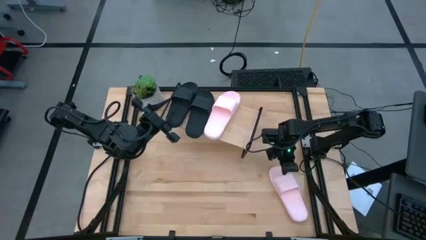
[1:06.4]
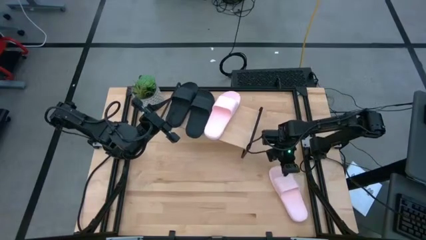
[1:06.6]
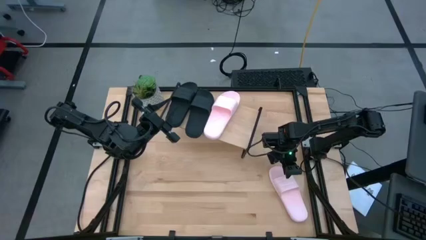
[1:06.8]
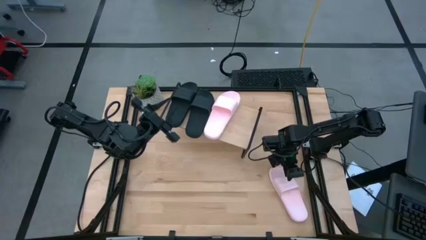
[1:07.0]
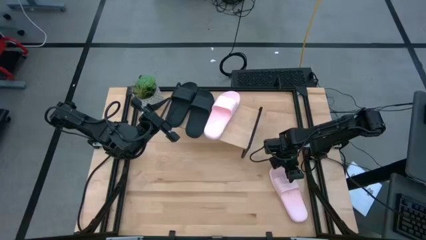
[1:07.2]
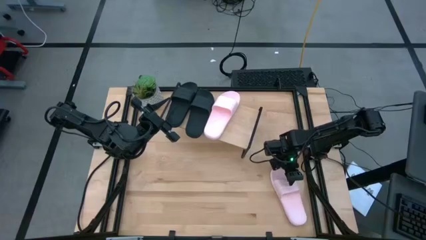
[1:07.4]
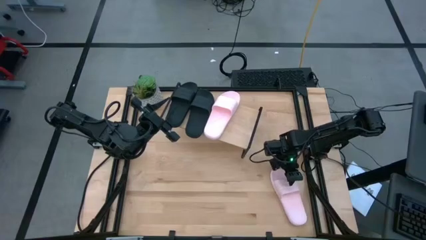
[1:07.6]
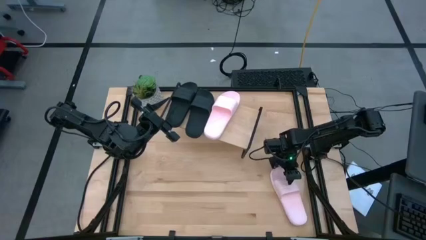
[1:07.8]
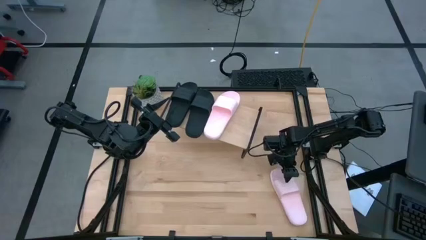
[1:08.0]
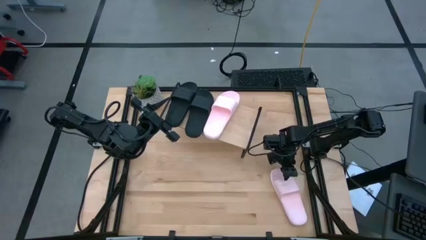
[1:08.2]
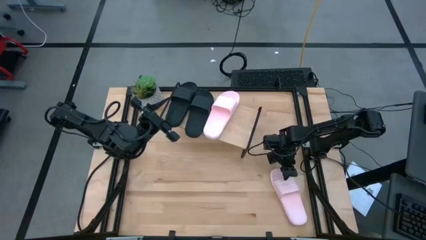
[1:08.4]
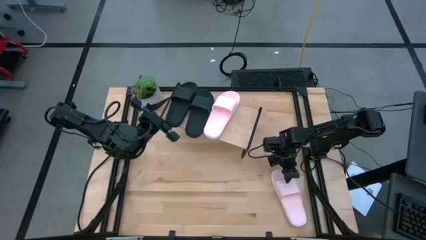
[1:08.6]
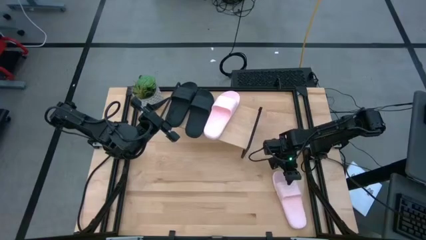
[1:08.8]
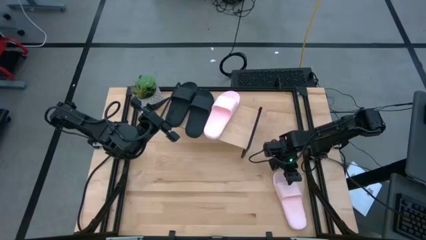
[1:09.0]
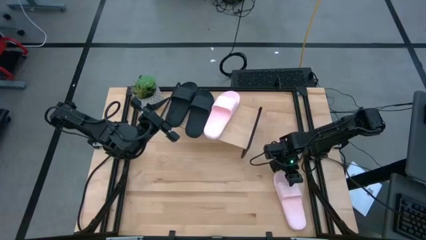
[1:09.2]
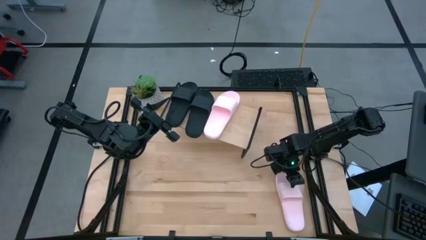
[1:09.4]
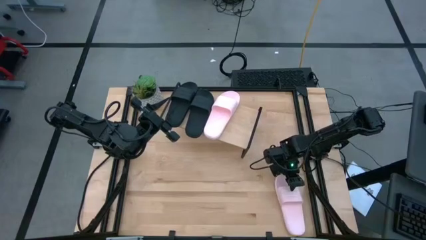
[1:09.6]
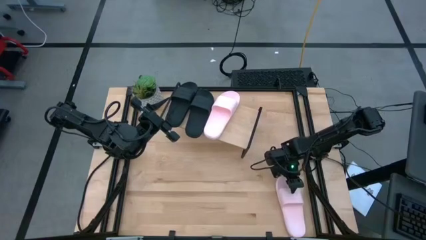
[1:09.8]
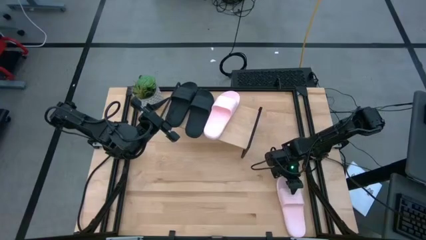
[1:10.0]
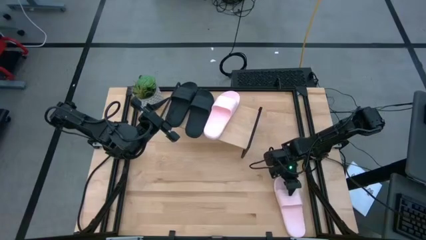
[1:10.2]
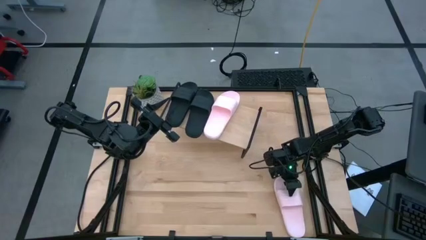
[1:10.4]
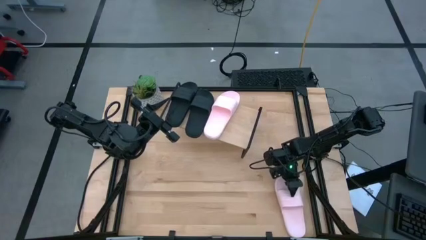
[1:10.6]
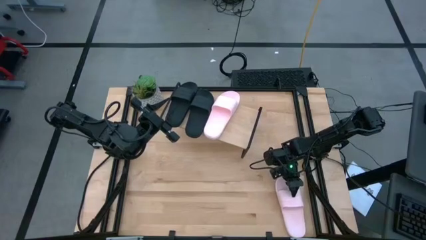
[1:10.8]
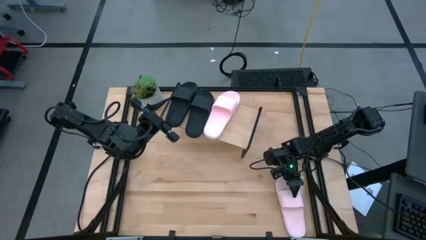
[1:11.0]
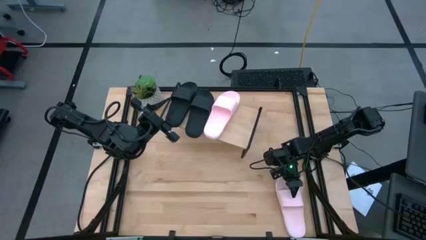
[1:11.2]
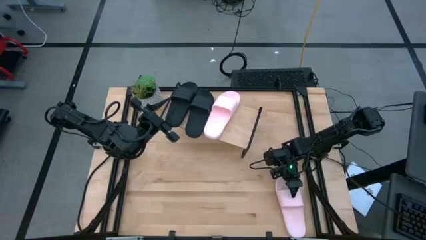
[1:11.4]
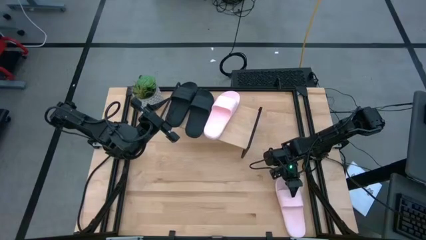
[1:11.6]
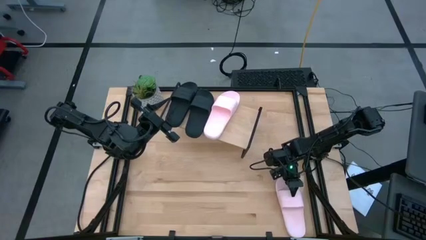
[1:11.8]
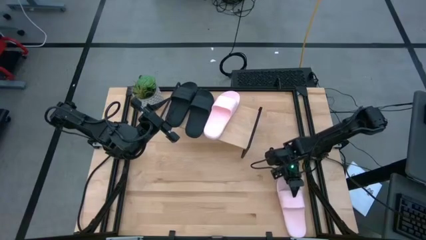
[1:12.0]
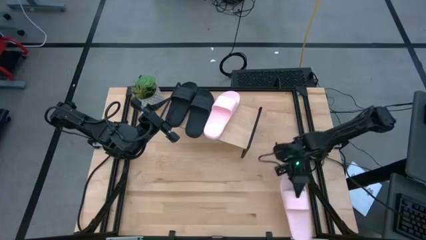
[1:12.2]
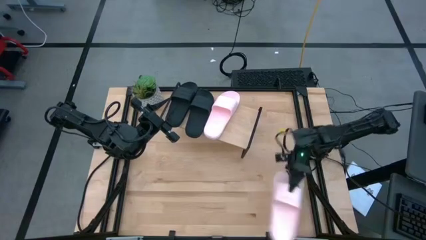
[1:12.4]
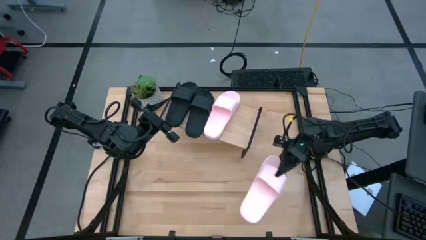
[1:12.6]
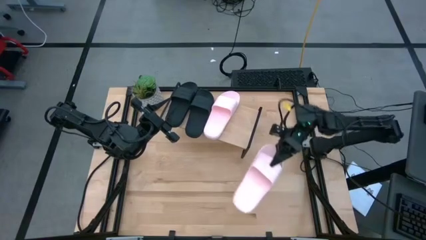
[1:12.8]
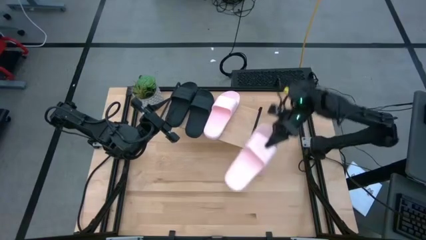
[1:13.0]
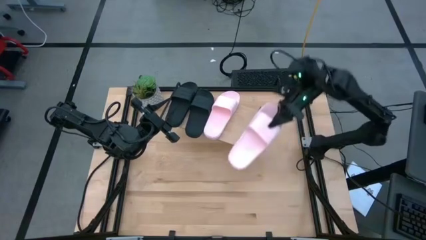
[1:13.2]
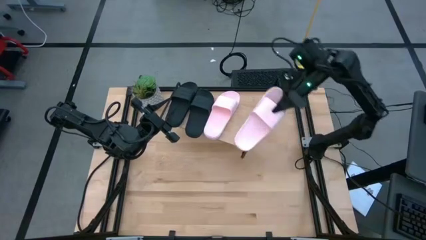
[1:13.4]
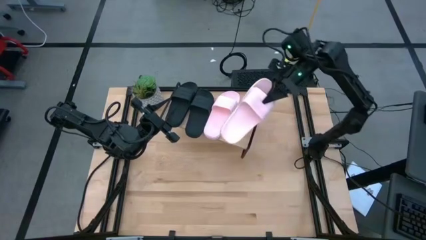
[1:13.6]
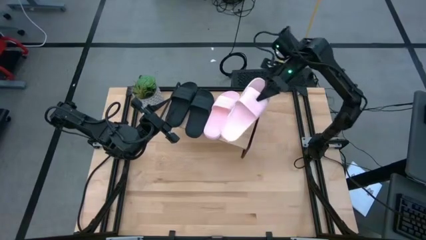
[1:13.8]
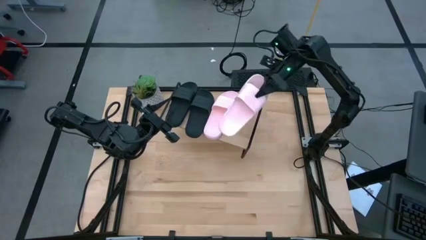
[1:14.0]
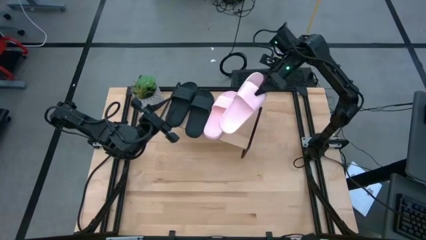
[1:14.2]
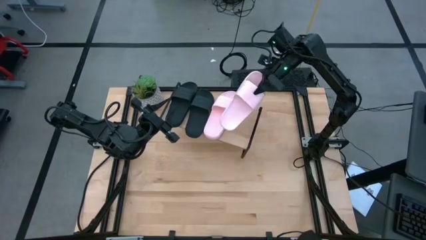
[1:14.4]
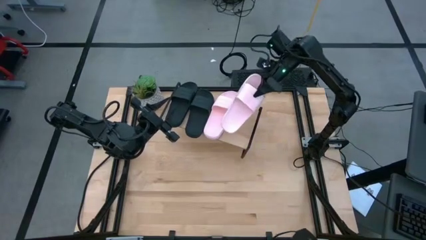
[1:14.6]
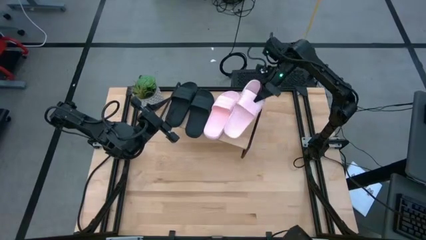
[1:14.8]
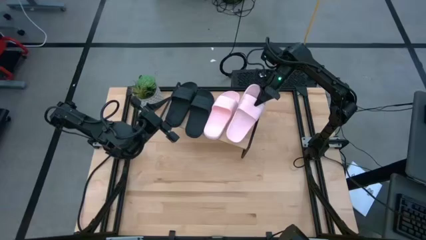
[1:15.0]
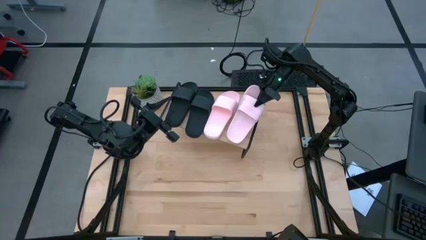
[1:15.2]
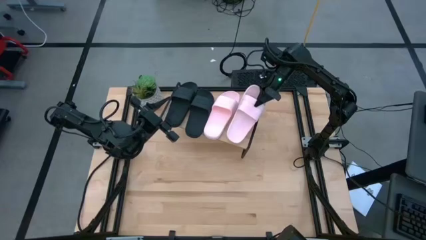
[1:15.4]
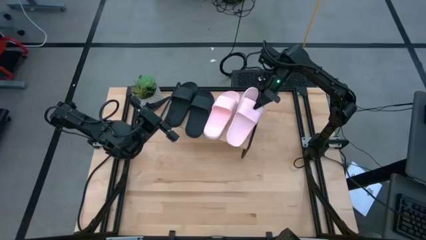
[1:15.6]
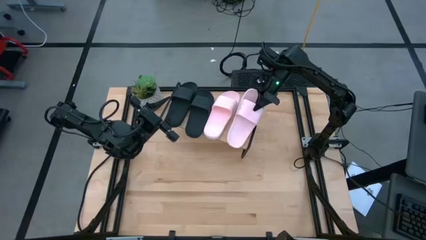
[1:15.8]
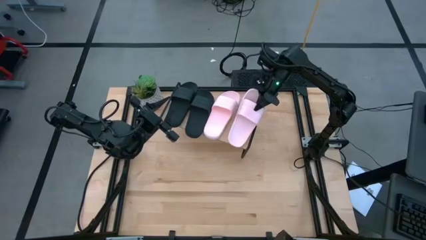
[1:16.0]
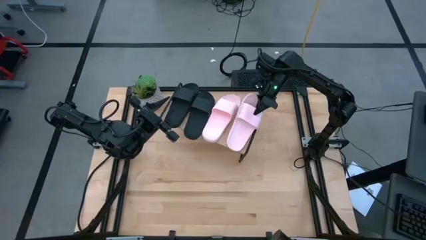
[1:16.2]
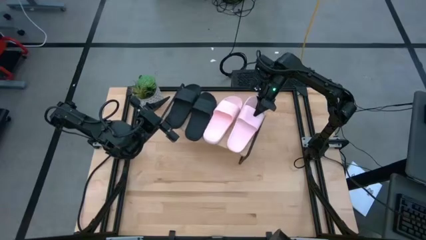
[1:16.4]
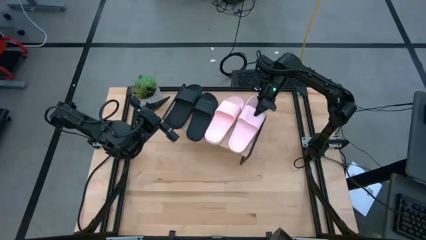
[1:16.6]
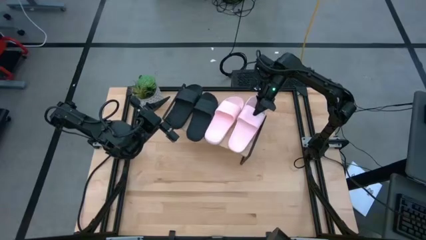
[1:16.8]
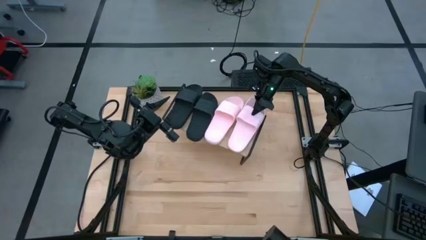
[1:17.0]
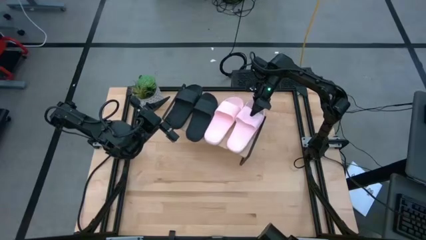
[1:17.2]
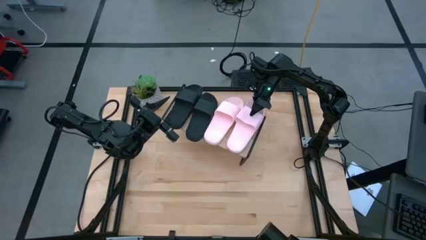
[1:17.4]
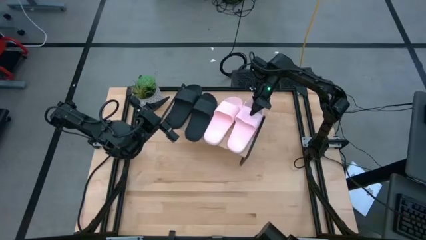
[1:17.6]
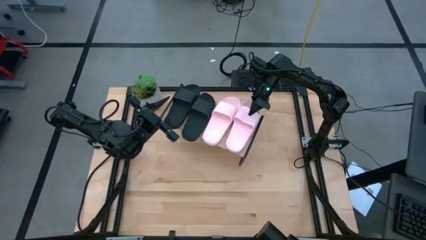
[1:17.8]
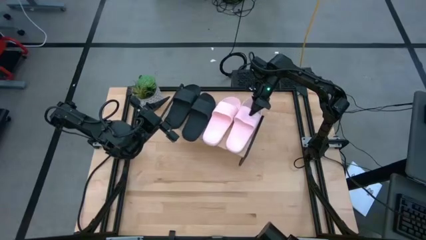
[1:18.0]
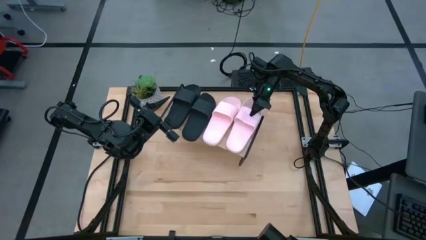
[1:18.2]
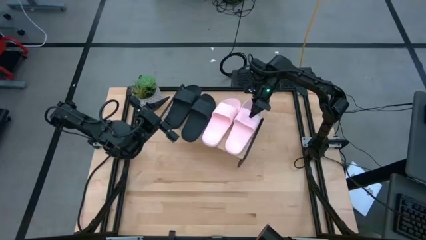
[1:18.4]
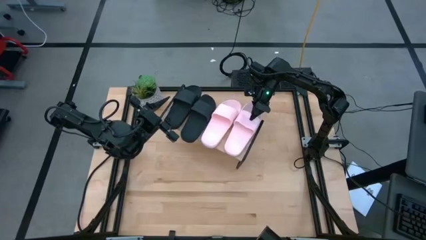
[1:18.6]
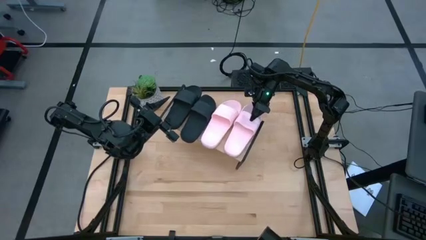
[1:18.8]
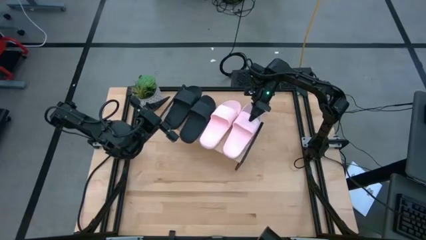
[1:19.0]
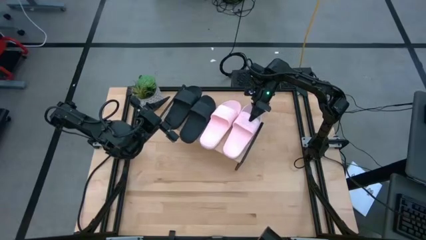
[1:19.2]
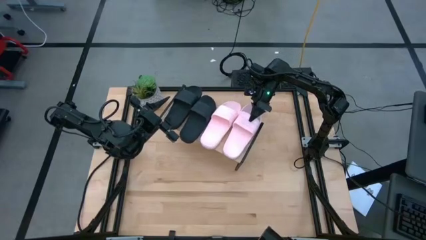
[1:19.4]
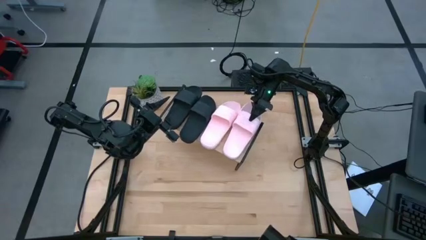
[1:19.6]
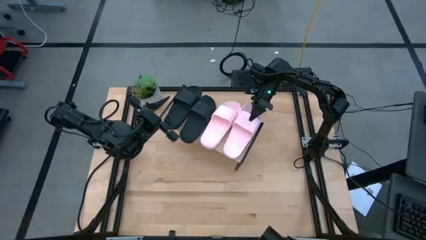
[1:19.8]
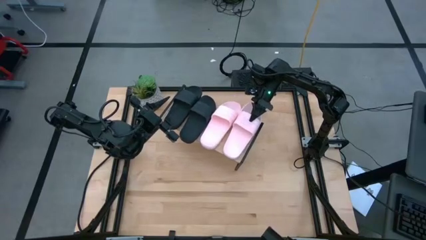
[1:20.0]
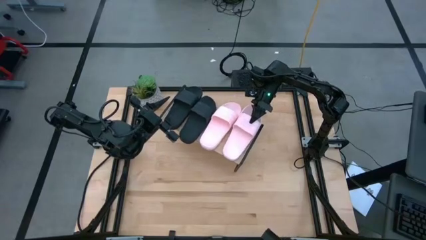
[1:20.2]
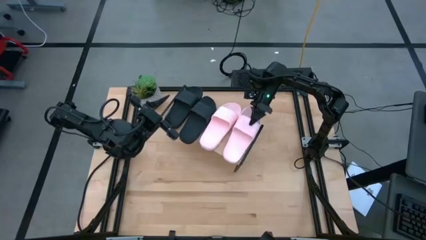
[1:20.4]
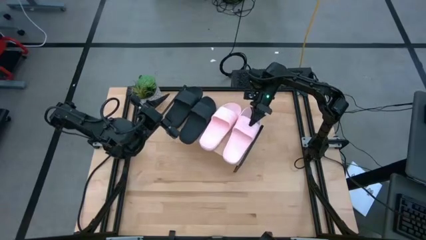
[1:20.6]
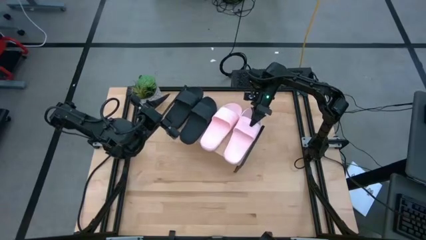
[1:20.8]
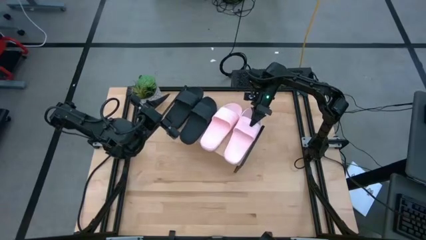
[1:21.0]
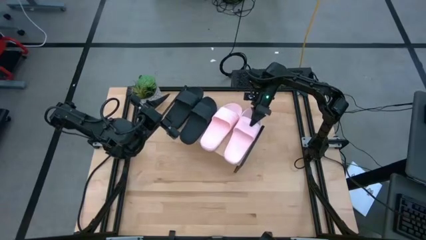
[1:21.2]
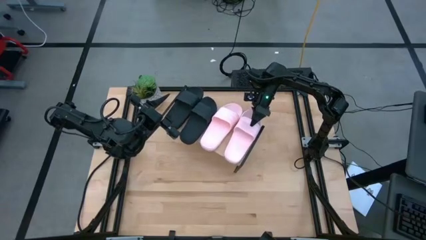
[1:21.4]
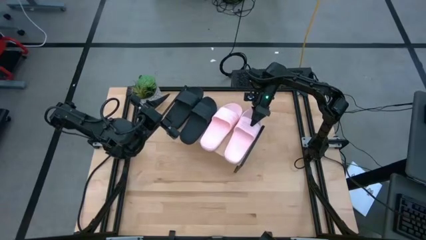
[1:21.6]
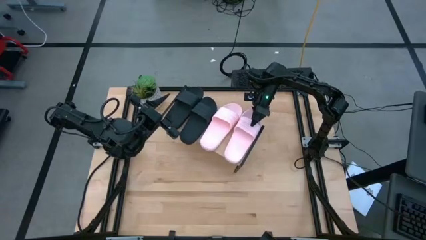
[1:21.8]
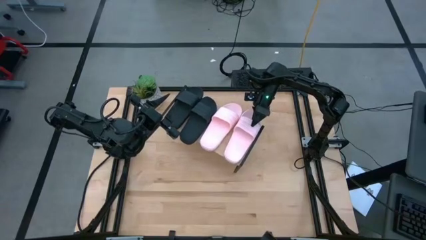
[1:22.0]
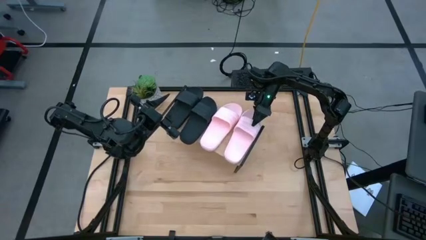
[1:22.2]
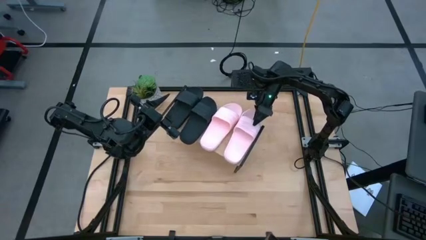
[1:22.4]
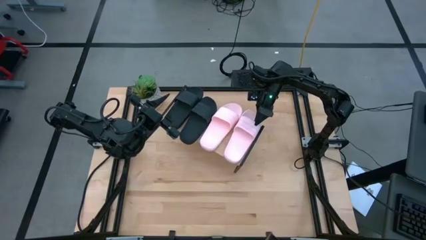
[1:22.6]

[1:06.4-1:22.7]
Task: Pick and place slides into the shelf
Put the pink slide on the pink slide
